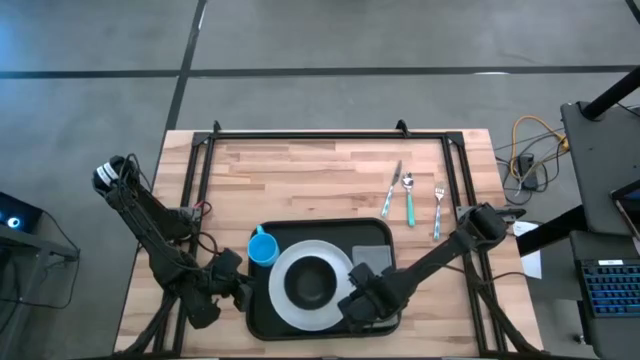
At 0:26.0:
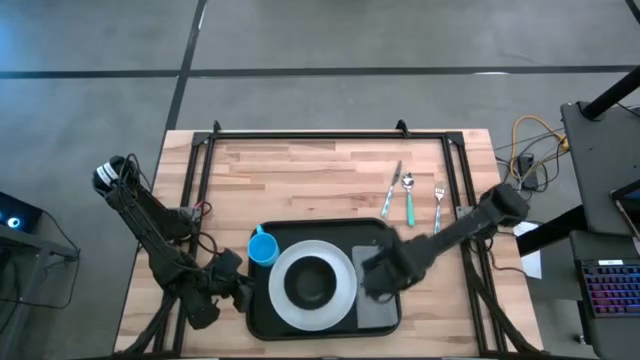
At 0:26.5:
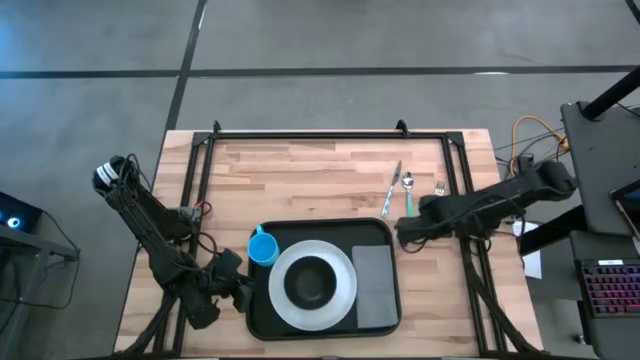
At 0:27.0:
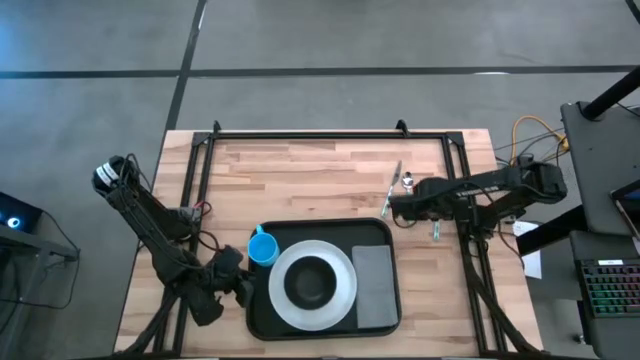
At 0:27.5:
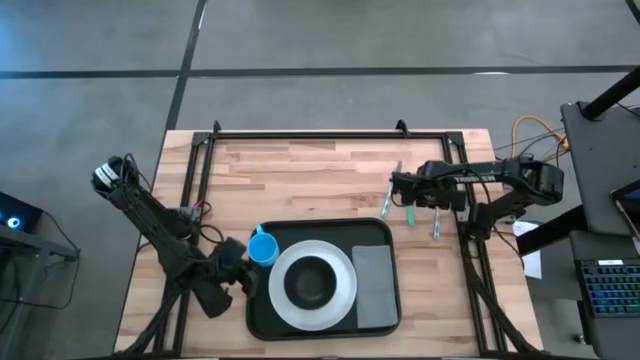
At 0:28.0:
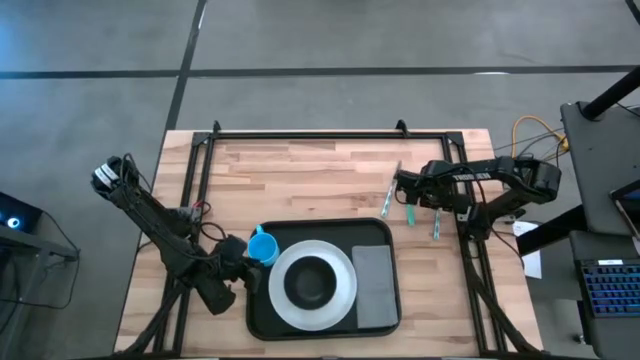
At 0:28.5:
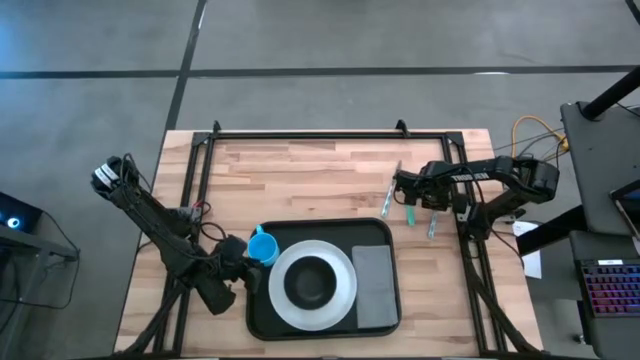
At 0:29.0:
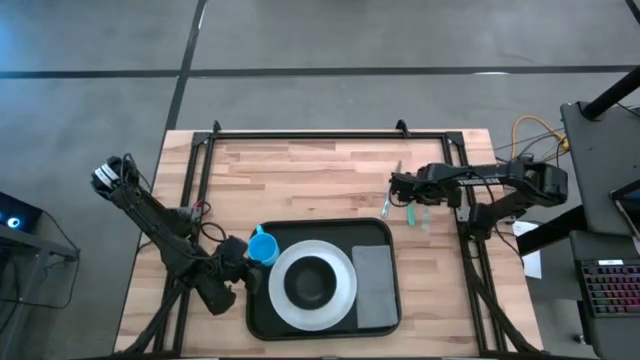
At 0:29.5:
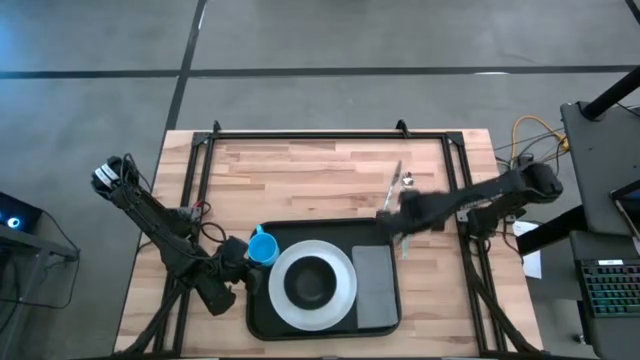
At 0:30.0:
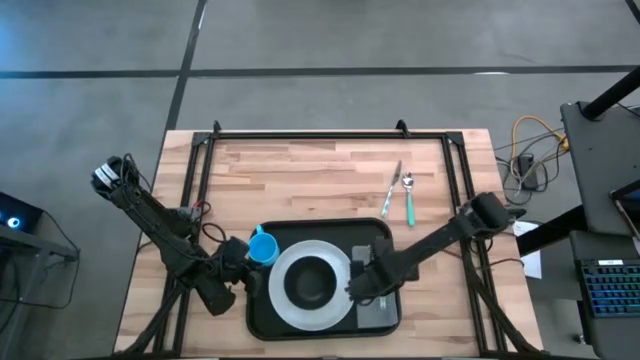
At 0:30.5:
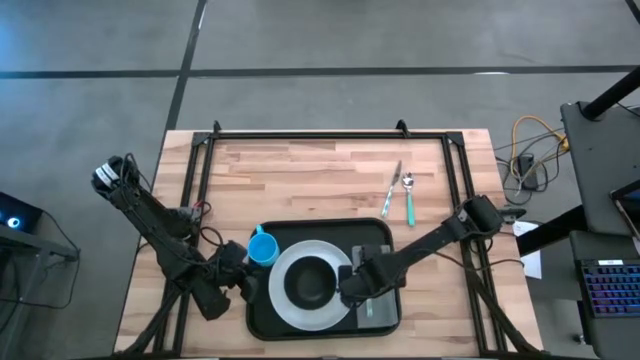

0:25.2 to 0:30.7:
Task: Set up tray
Put the fork on top of the napkin

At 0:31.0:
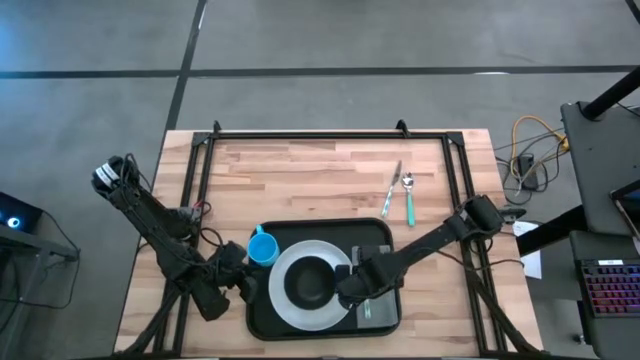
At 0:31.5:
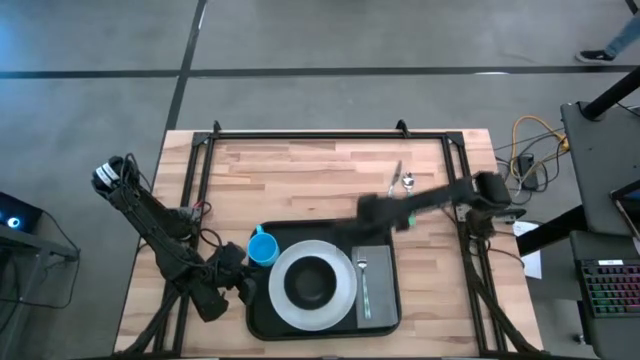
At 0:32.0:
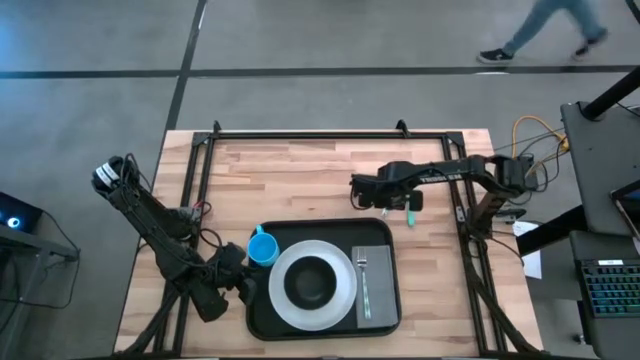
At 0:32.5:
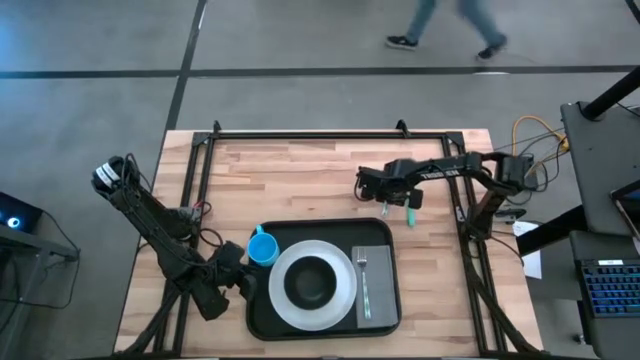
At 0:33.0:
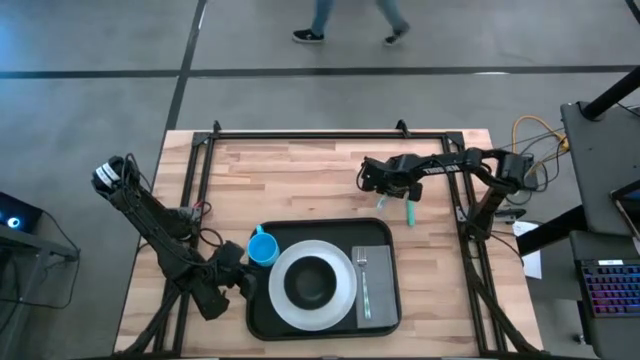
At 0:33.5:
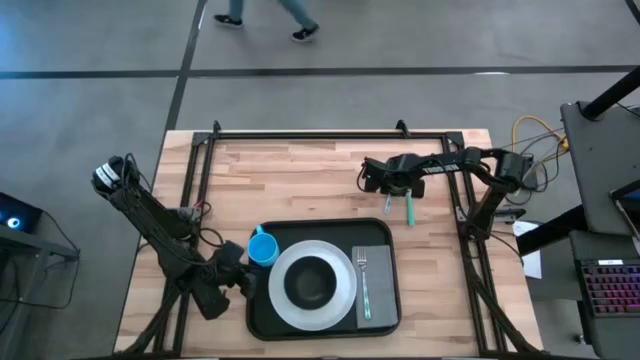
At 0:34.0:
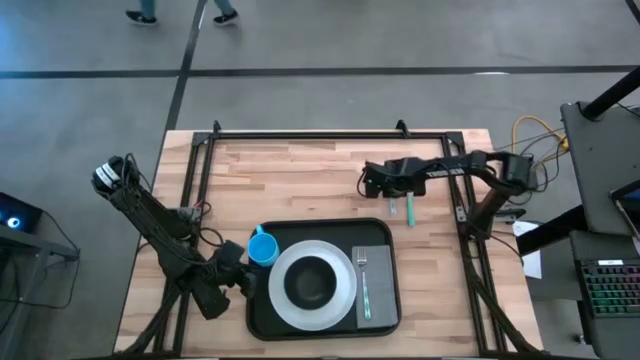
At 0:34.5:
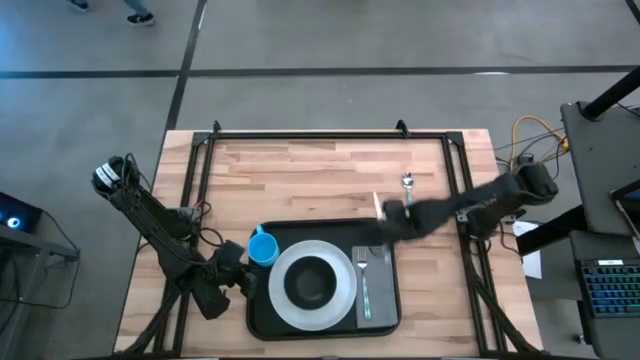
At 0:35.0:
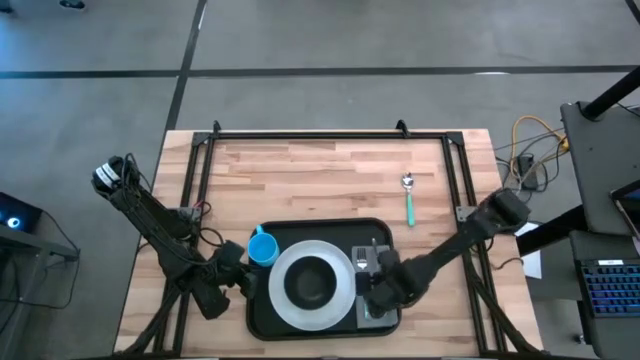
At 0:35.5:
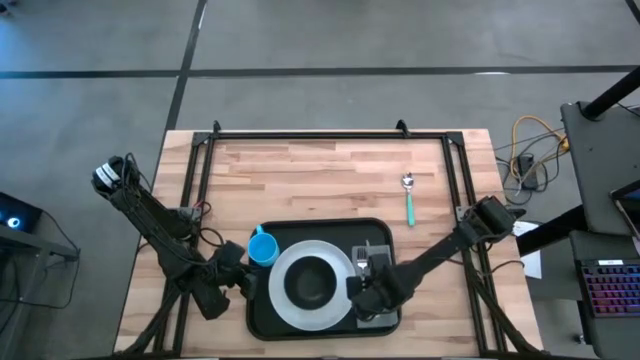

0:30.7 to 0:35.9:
Put the knife on top of the napkin

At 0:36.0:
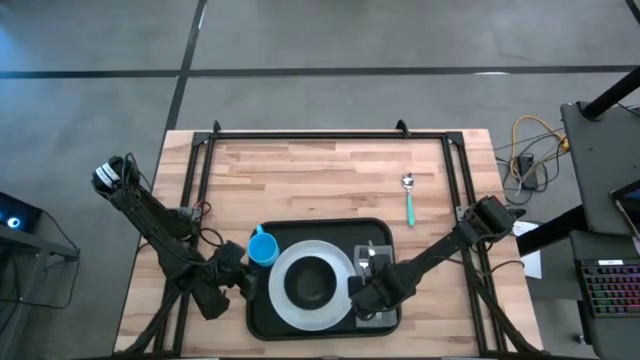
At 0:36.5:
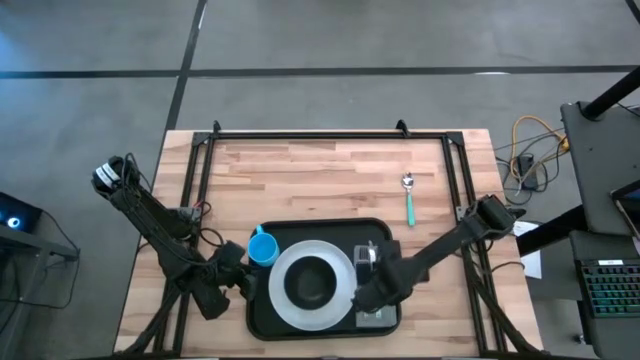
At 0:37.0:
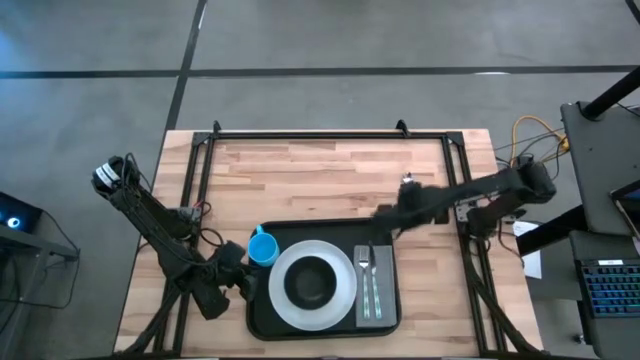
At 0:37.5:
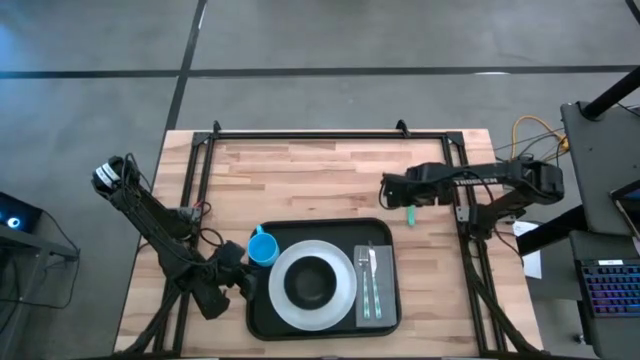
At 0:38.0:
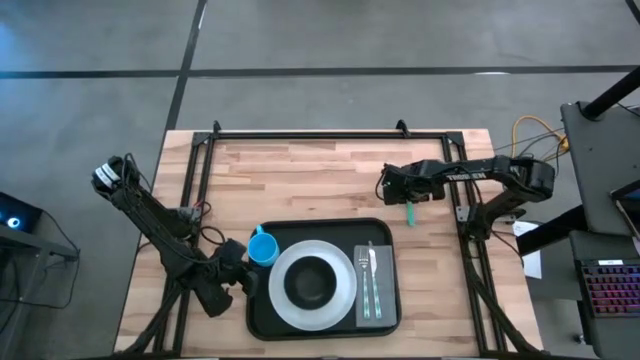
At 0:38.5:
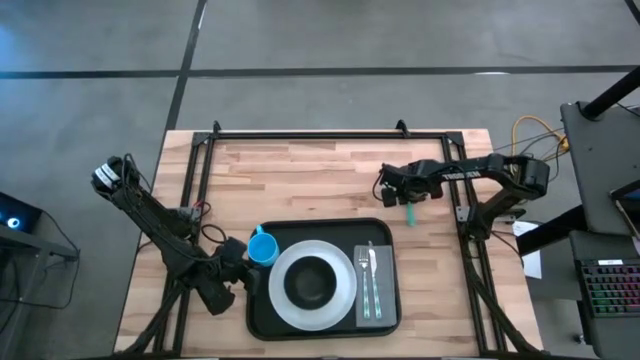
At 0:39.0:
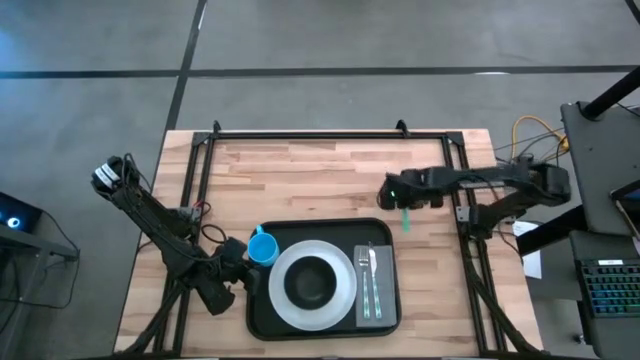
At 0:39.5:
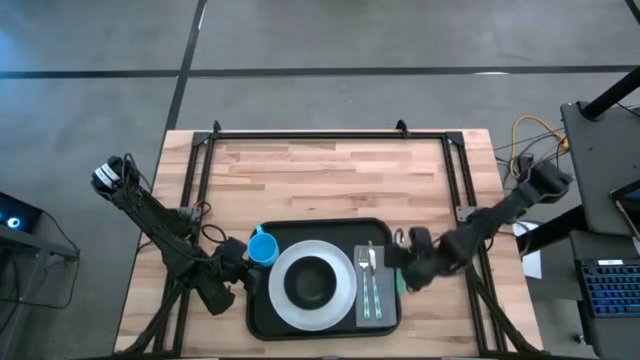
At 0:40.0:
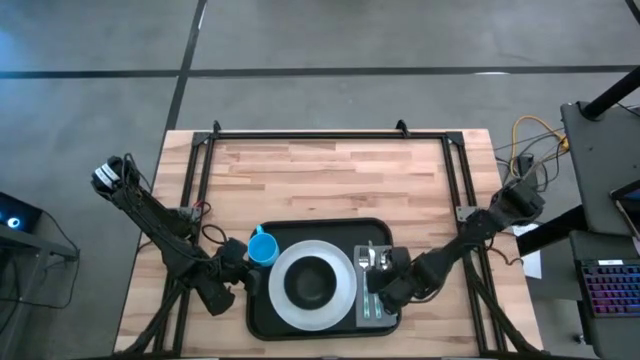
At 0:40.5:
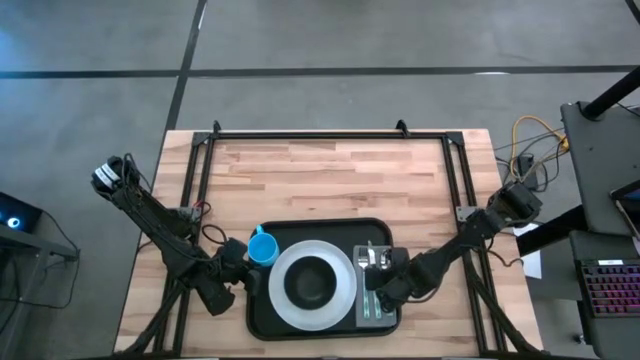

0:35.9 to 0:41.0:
Put the spoon on top of the napkin

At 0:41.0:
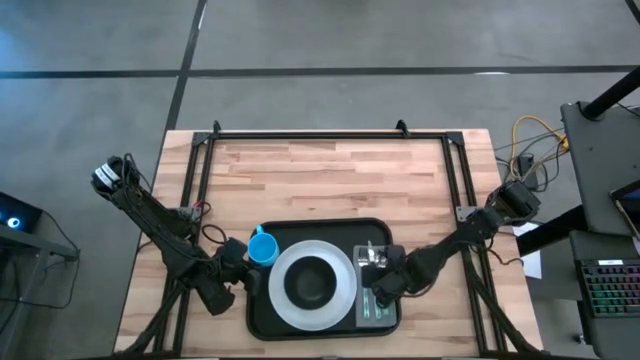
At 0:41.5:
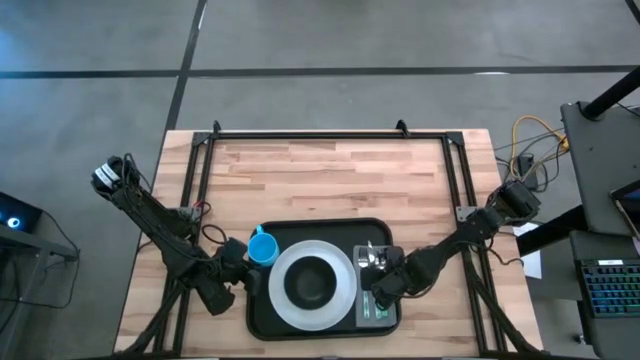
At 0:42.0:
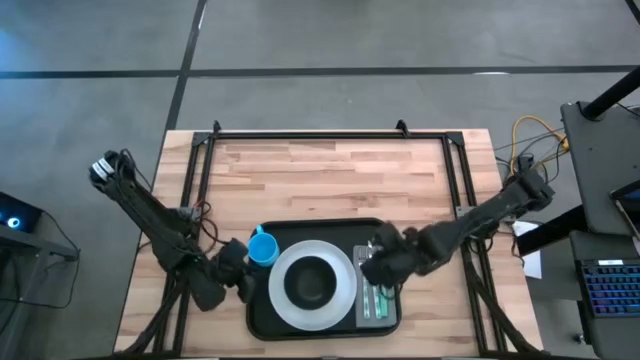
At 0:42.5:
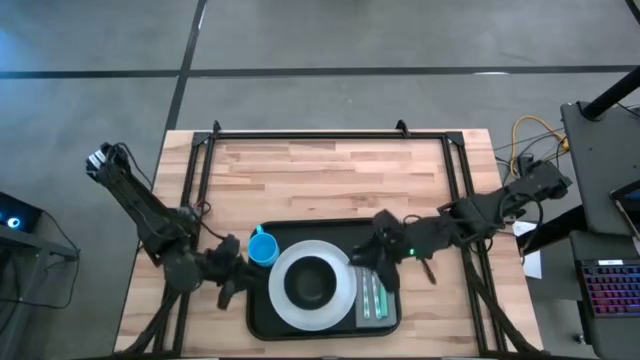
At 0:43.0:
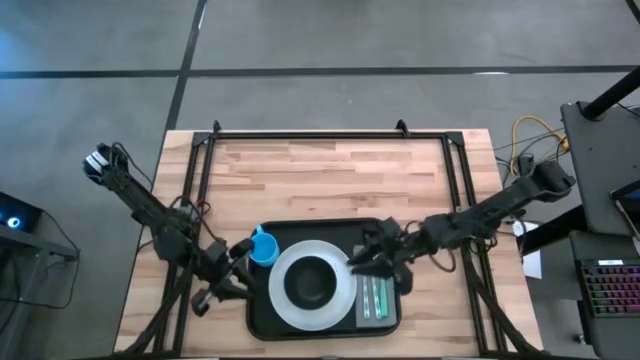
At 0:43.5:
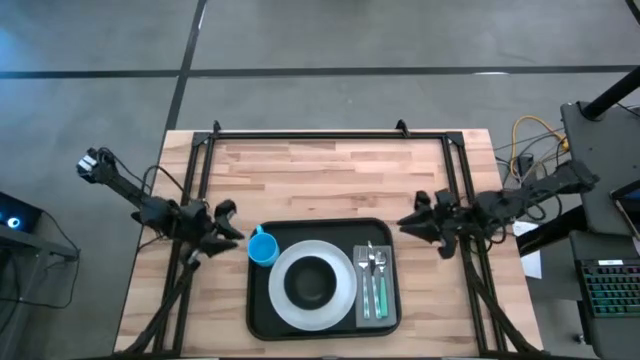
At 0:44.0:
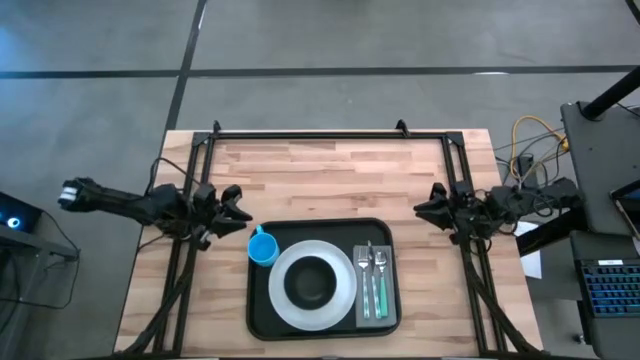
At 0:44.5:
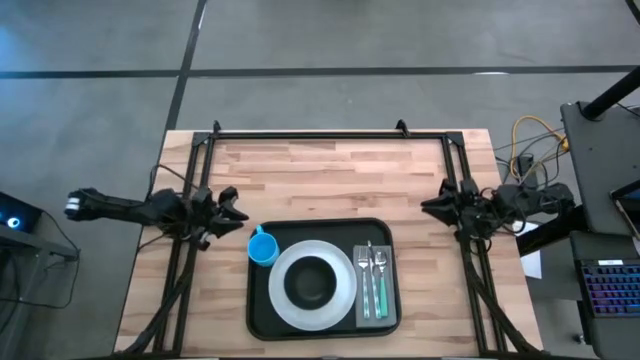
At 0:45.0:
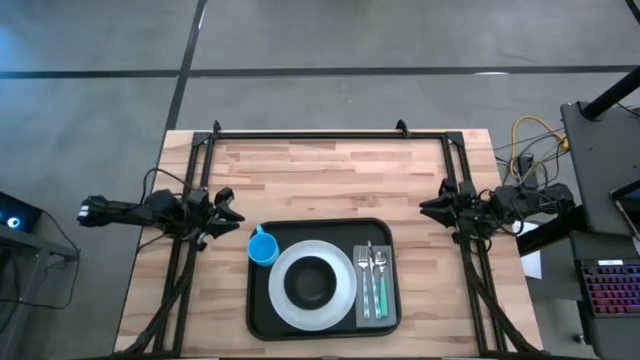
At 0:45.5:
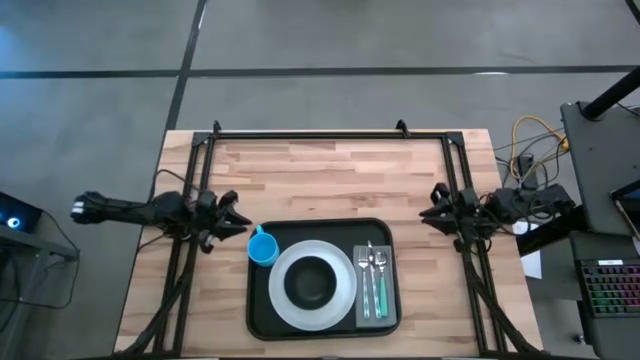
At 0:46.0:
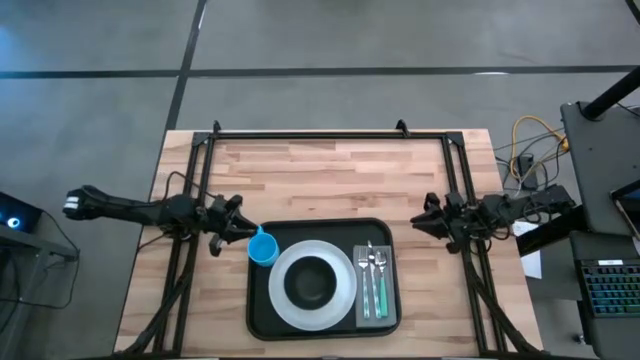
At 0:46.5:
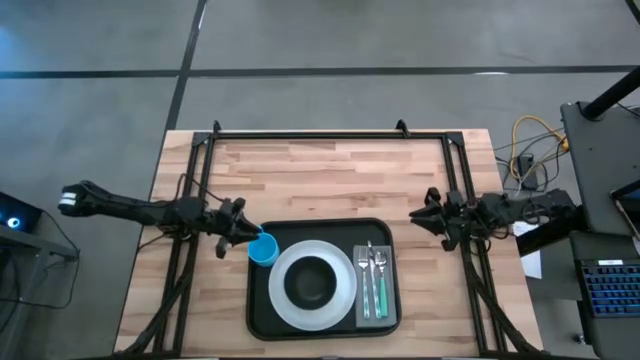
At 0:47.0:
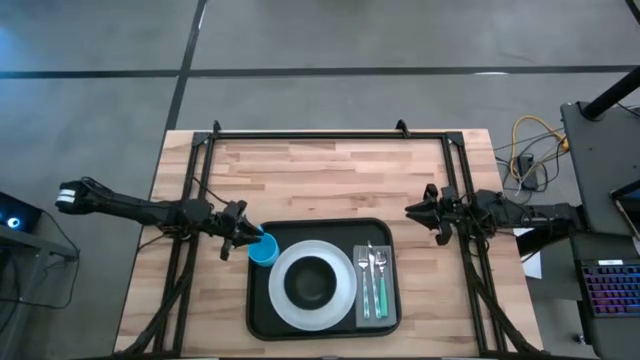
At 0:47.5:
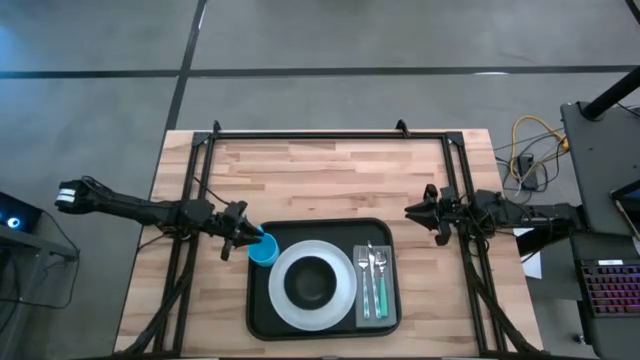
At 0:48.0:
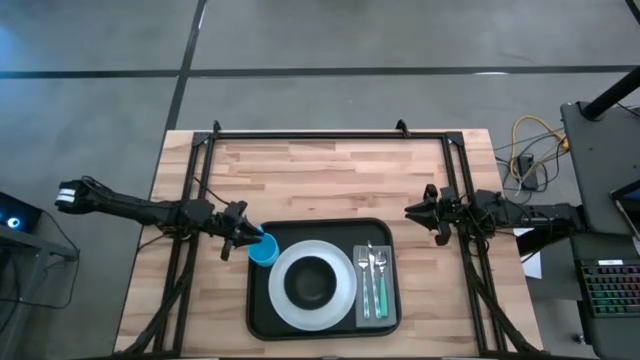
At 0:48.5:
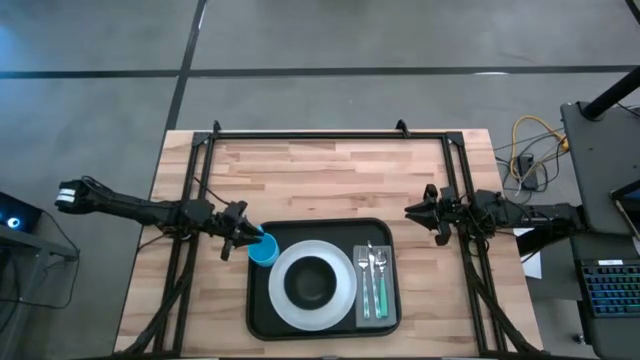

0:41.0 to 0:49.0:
Return to Home Position
